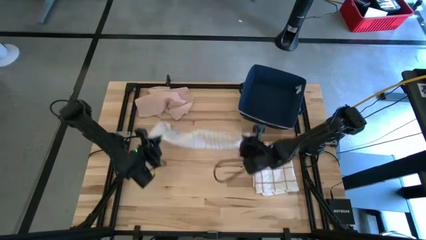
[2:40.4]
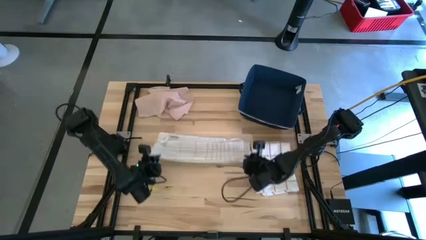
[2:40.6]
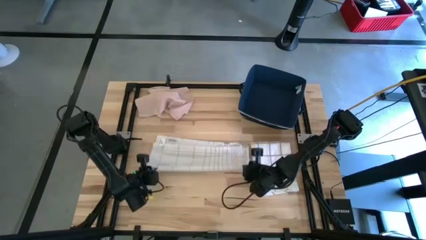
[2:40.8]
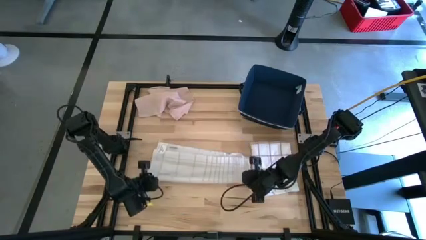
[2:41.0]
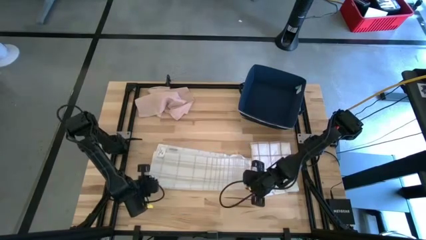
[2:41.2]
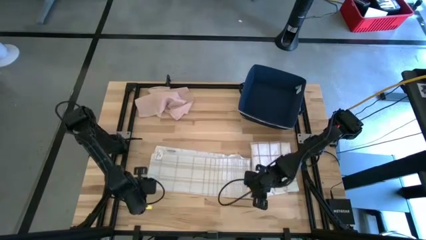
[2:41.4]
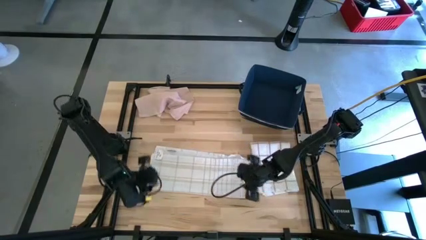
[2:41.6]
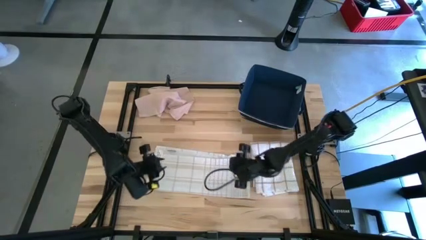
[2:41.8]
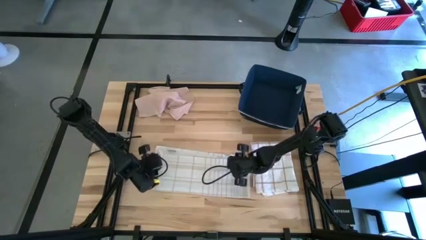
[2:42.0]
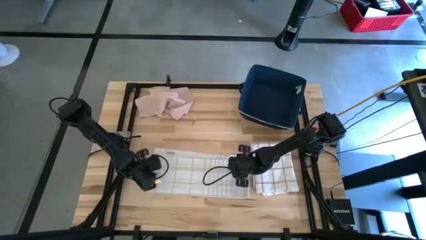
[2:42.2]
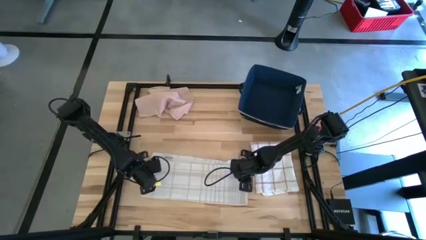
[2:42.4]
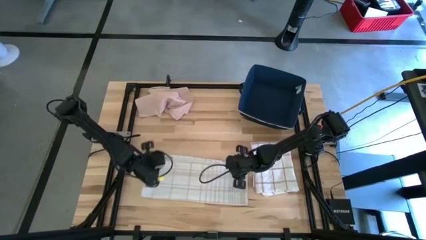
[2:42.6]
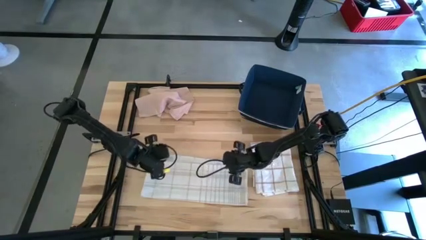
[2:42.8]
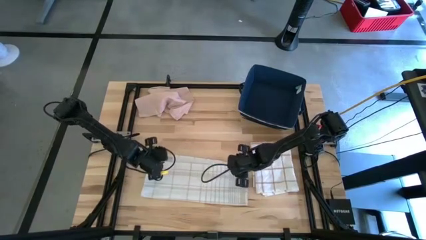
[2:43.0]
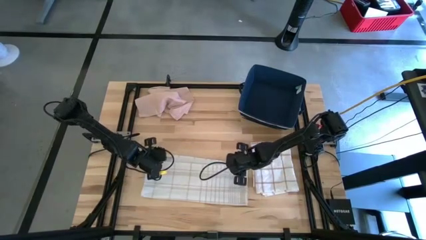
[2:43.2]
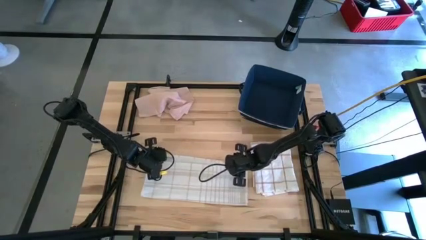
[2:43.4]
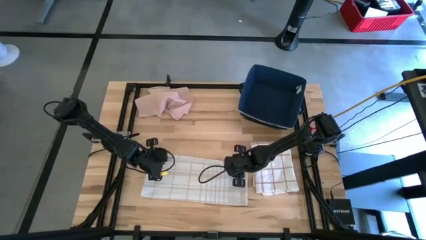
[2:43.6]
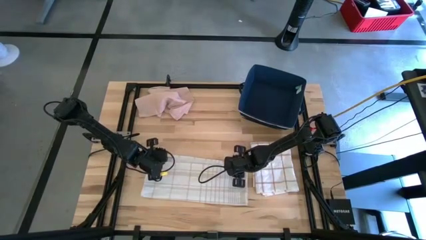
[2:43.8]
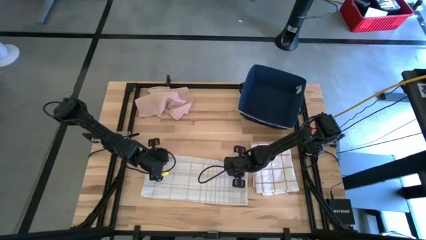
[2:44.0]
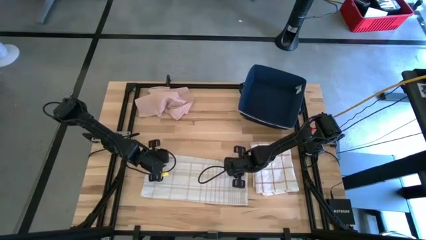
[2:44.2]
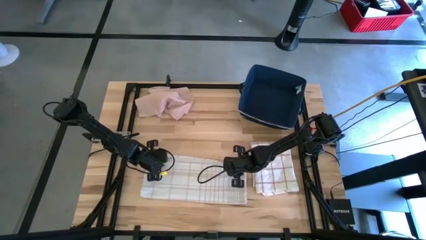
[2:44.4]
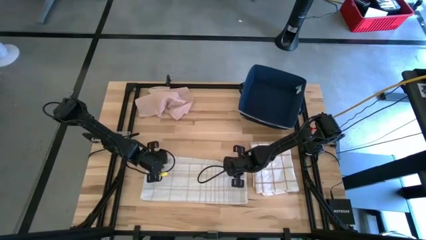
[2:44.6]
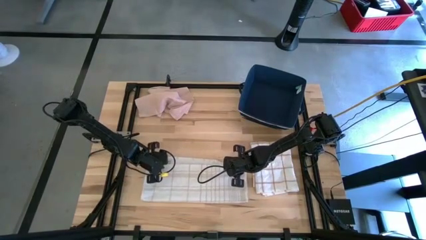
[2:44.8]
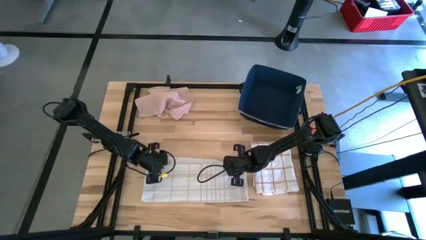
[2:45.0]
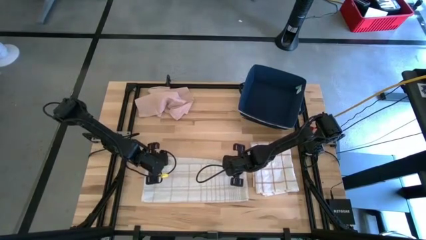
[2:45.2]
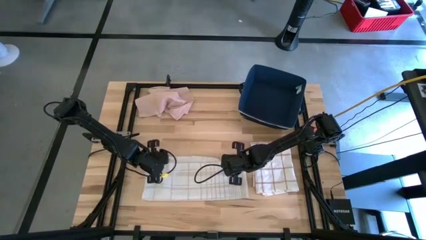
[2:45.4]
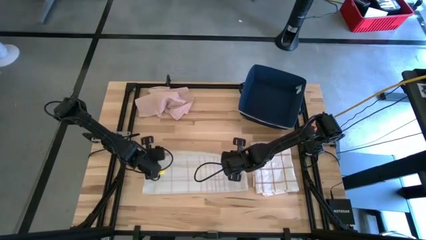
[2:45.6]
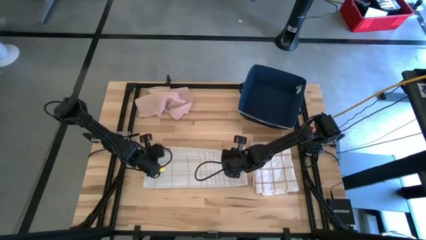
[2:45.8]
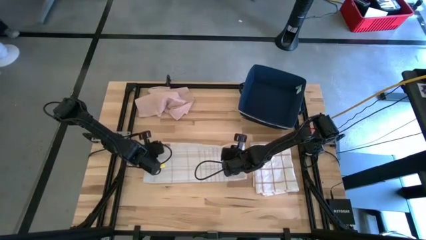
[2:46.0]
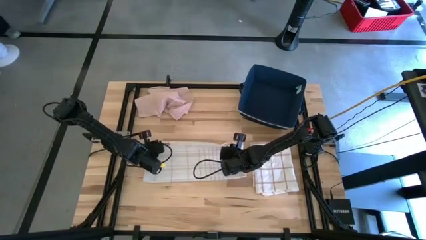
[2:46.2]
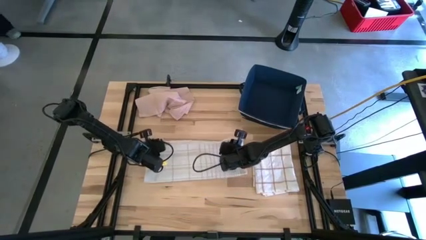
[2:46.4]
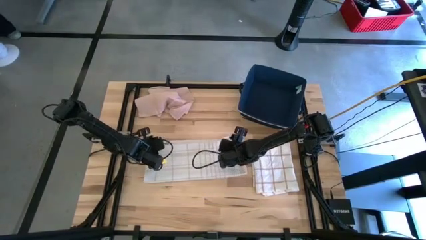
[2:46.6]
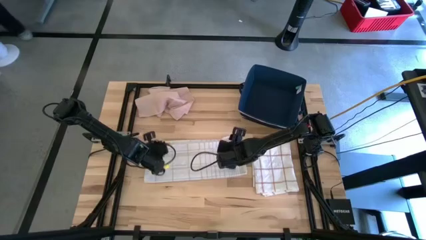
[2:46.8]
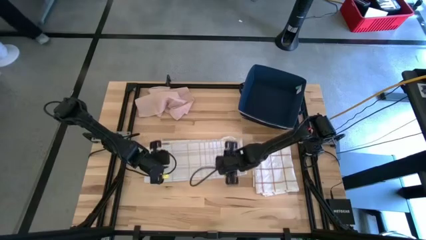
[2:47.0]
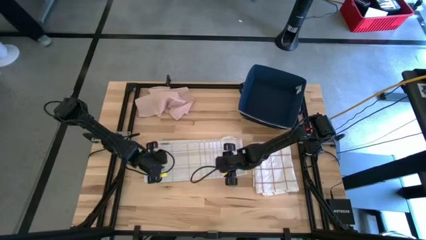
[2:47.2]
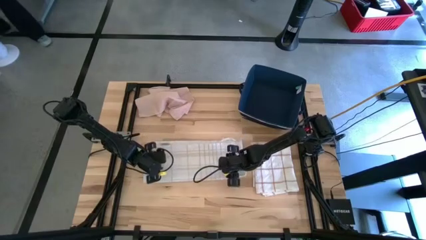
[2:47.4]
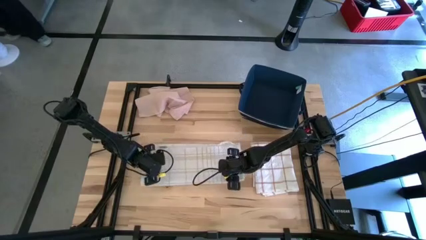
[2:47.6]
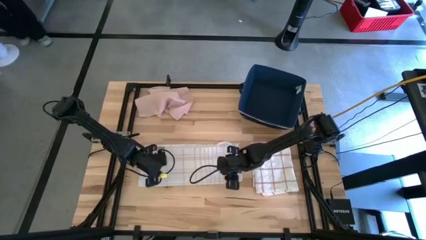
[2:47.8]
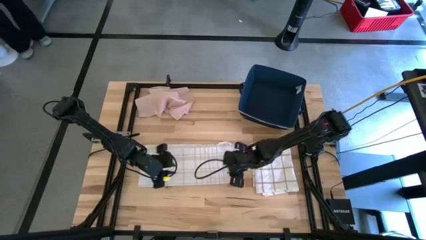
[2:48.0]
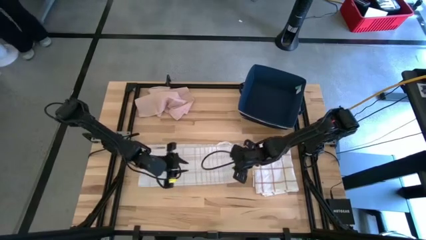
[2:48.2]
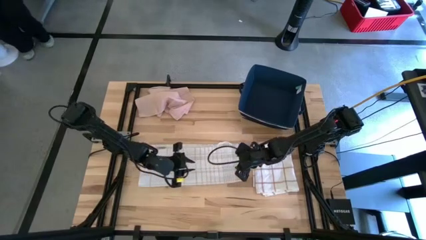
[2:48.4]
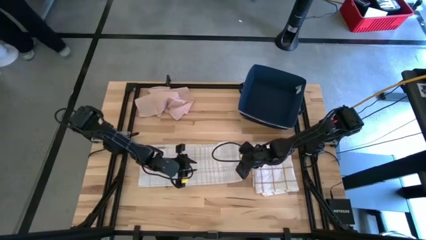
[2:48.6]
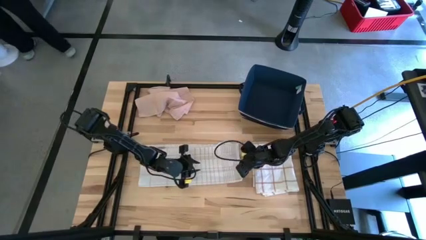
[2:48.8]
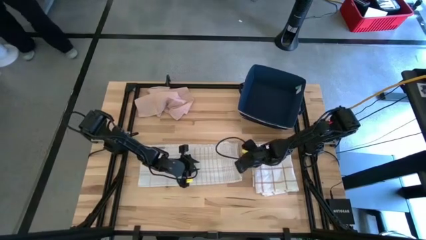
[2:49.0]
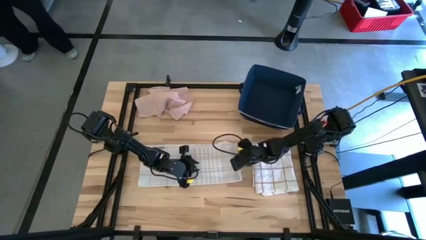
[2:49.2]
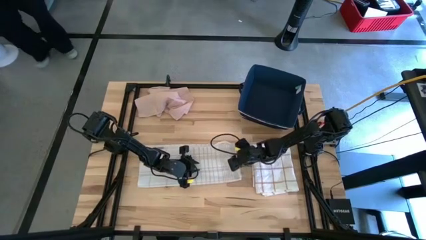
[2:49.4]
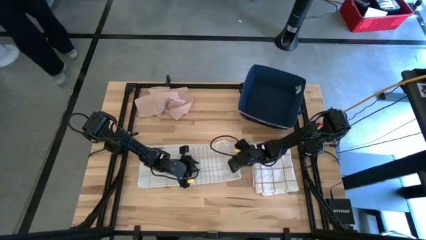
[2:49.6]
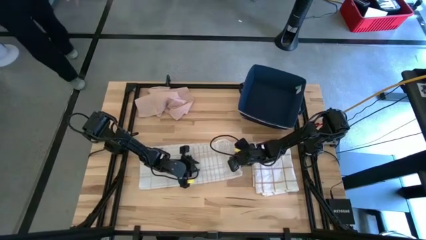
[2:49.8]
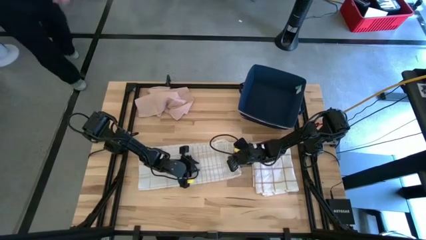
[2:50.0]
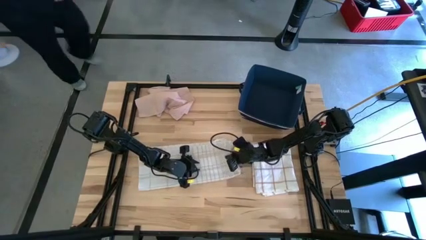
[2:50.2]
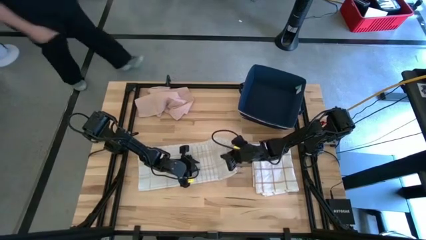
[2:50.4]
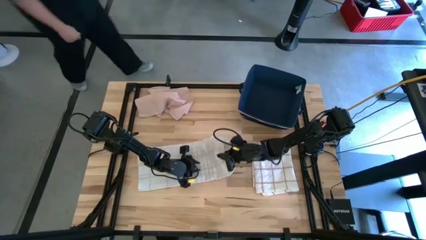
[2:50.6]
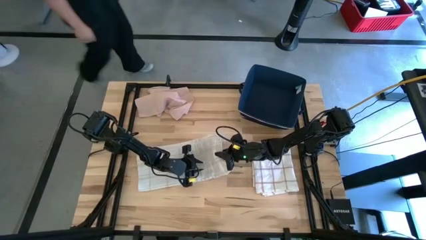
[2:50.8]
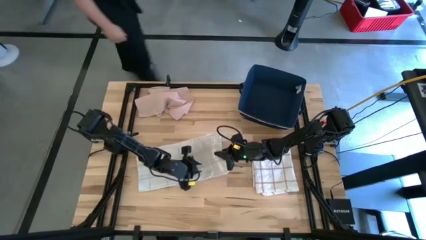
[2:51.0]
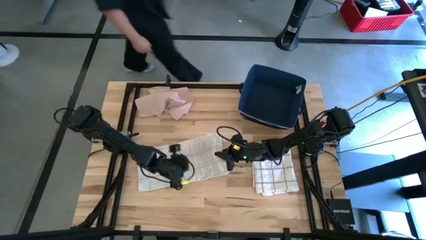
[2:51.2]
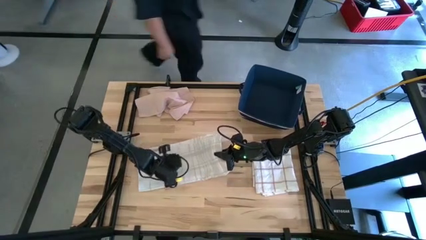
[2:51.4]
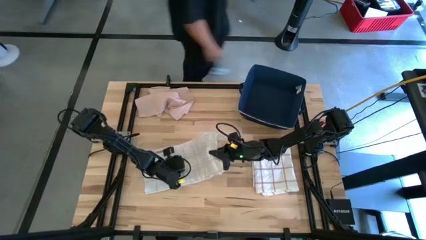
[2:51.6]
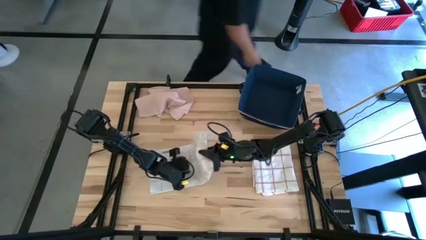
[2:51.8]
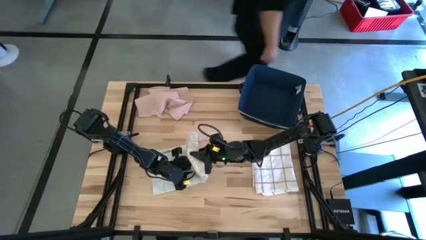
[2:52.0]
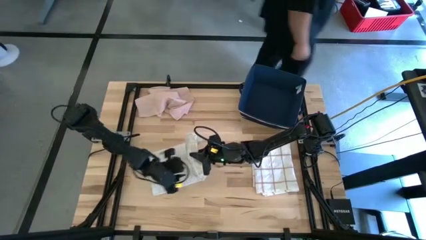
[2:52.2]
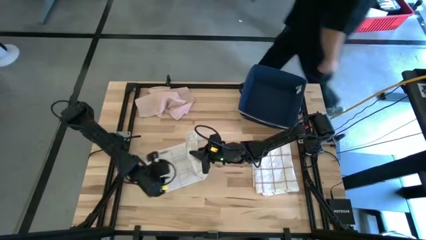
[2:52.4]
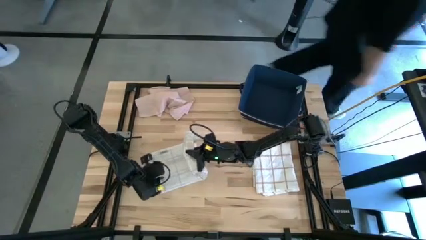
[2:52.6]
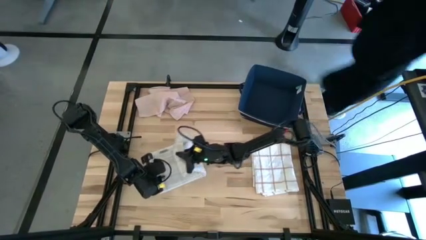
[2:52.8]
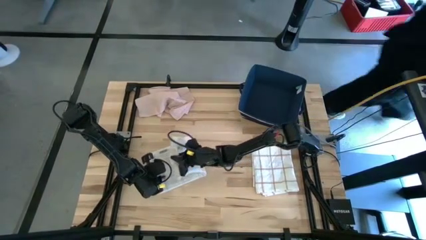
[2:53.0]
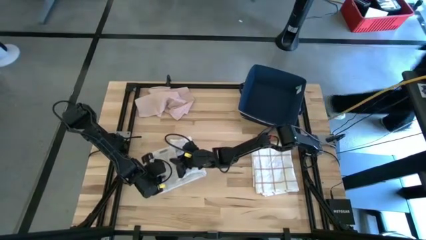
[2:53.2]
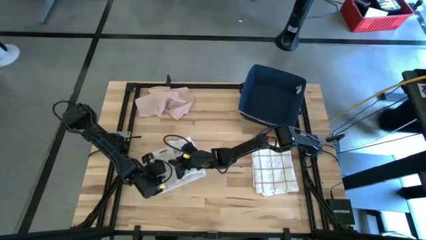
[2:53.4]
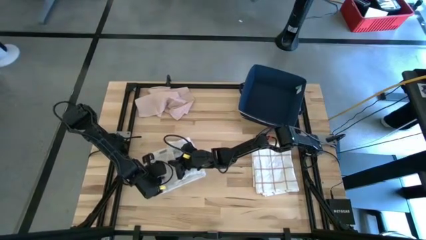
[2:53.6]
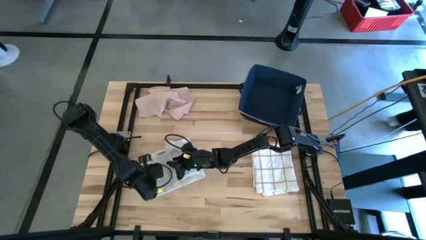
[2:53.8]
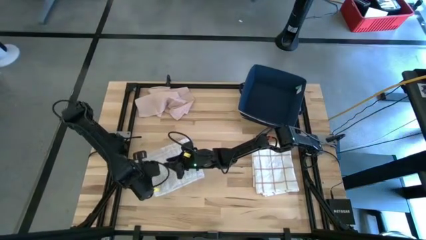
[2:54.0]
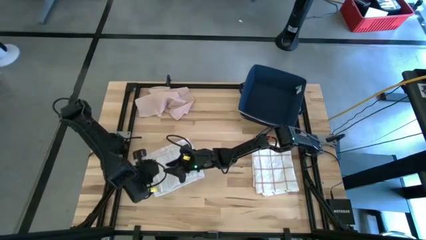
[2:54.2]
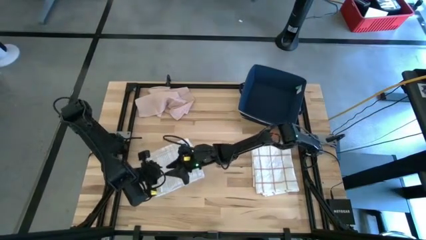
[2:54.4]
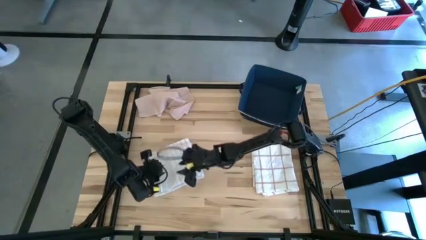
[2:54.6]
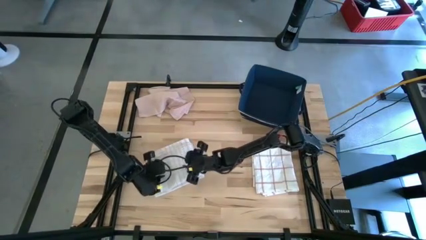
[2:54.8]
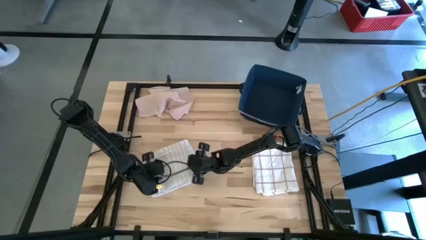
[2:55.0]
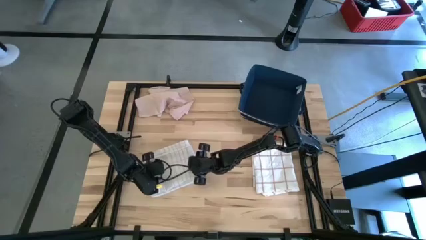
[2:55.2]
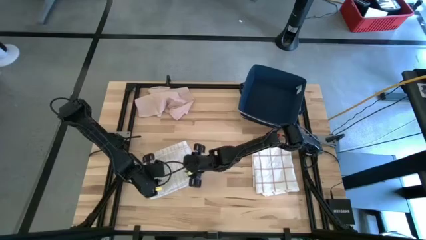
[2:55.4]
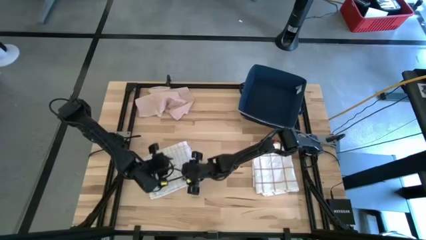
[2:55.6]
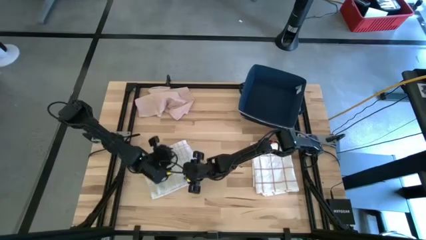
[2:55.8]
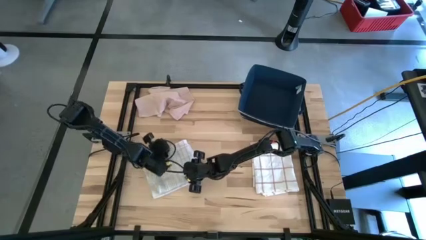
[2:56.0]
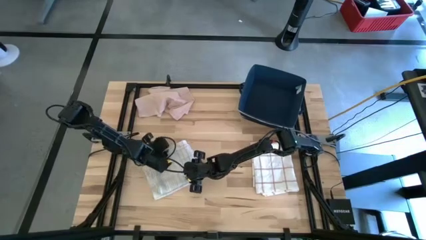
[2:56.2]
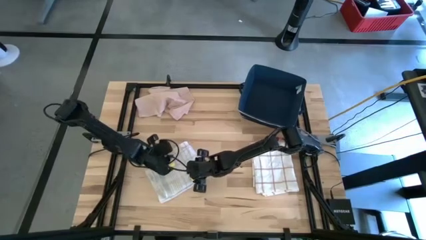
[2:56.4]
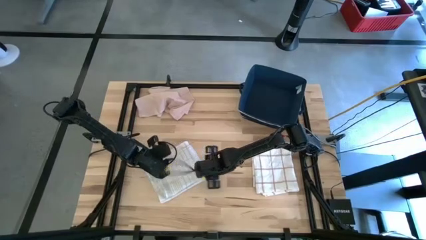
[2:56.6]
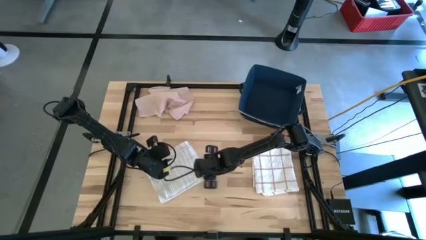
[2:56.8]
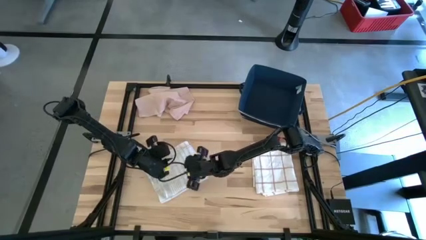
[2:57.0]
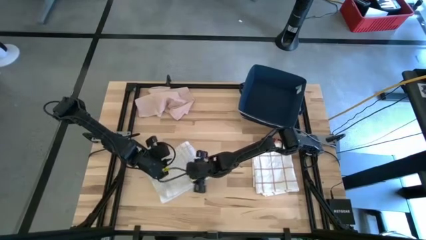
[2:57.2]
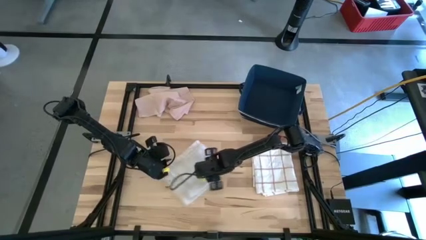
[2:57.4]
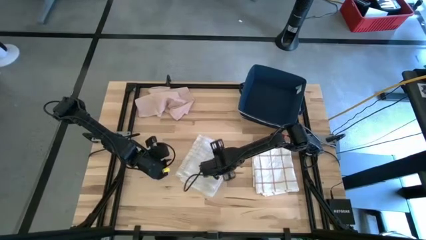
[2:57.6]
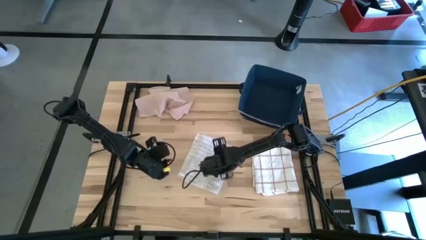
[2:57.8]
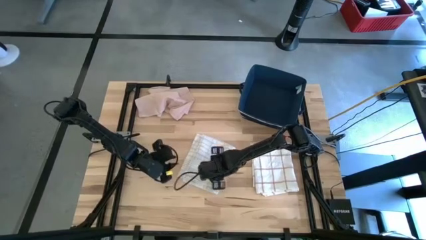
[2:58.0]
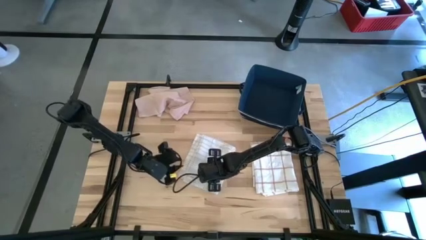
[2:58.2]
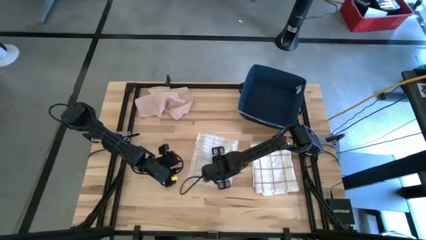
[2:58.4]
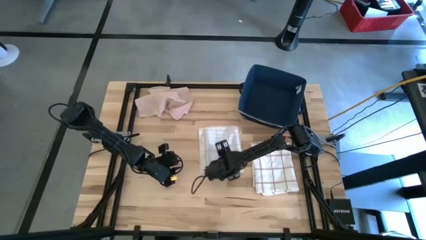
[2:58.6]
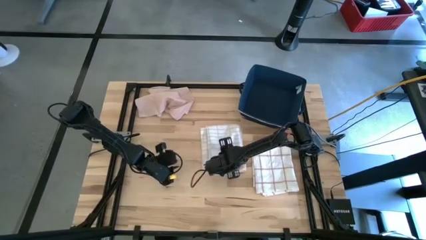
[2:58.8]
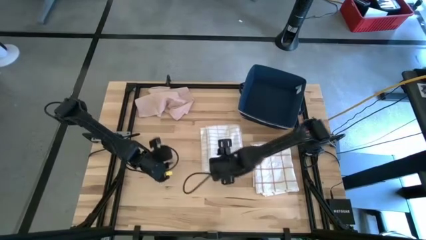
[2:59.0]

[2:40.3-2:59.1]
Task: Fold towel
Fold the white with grey-stripe towel
